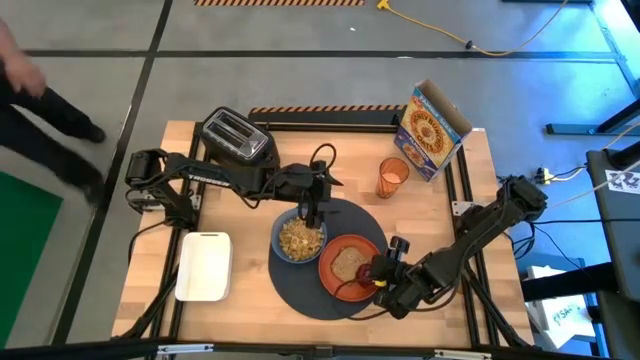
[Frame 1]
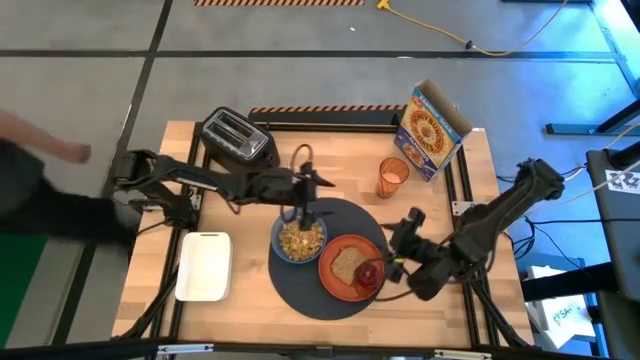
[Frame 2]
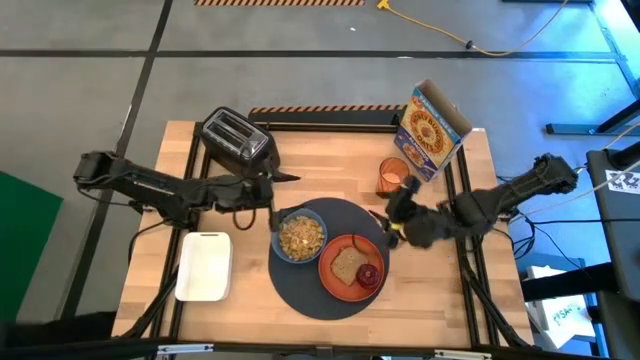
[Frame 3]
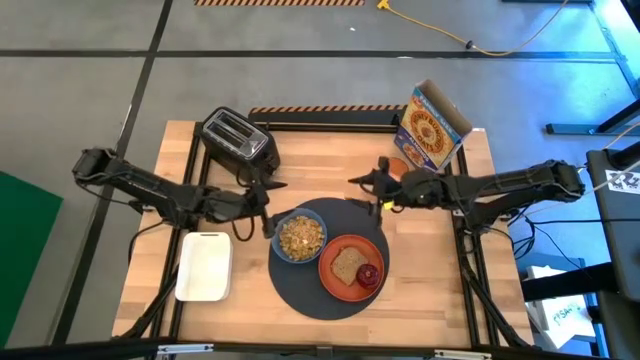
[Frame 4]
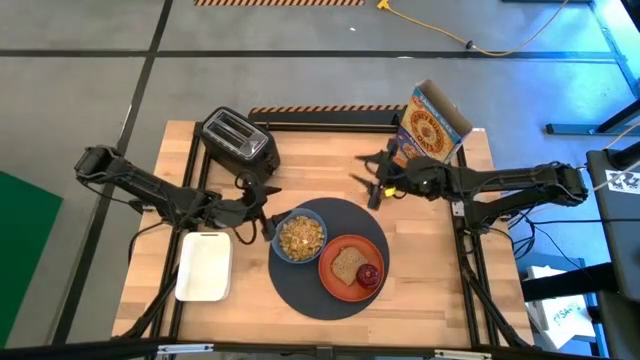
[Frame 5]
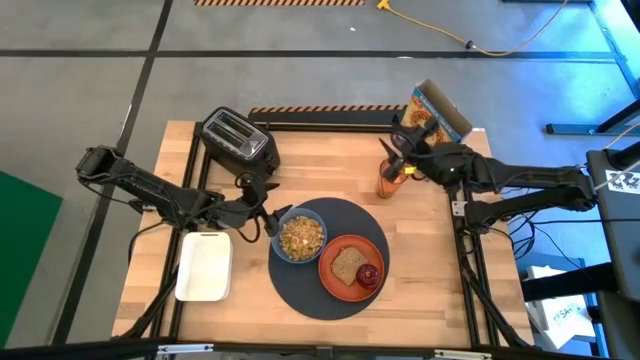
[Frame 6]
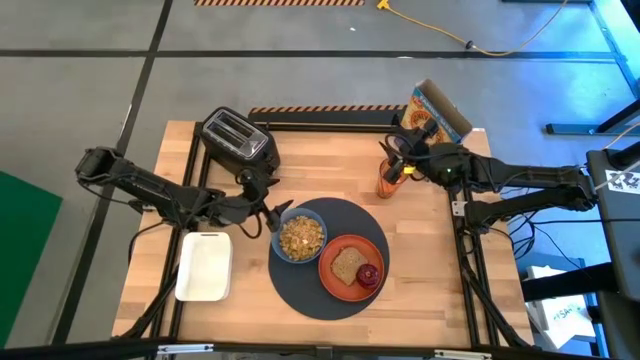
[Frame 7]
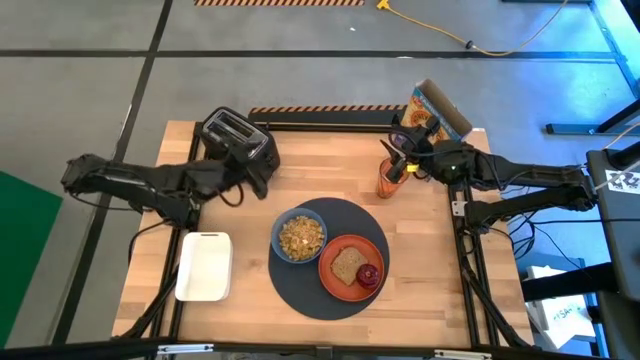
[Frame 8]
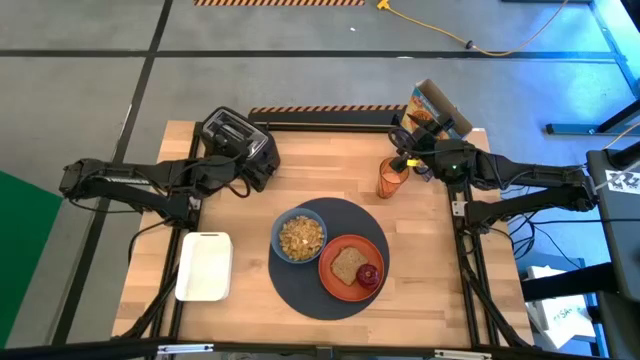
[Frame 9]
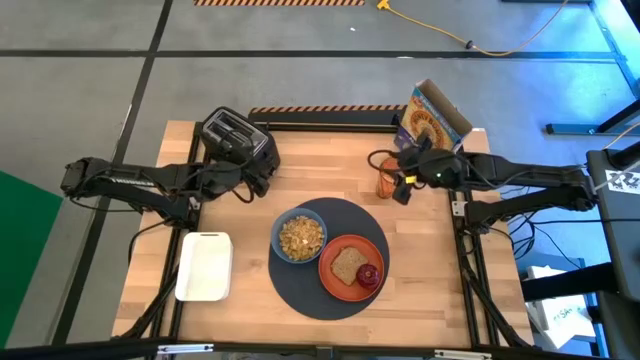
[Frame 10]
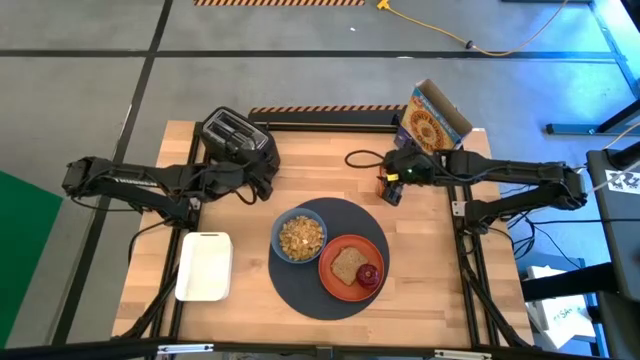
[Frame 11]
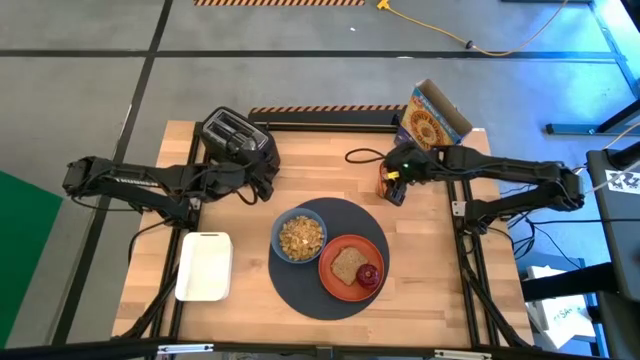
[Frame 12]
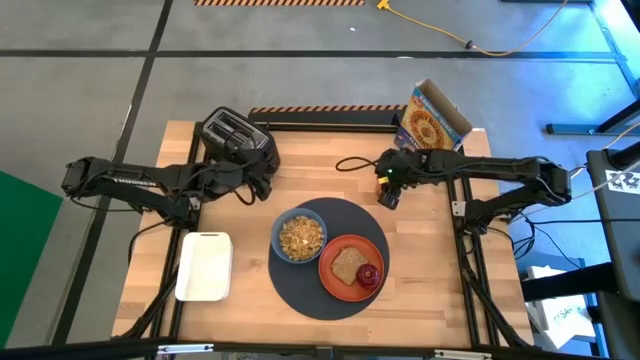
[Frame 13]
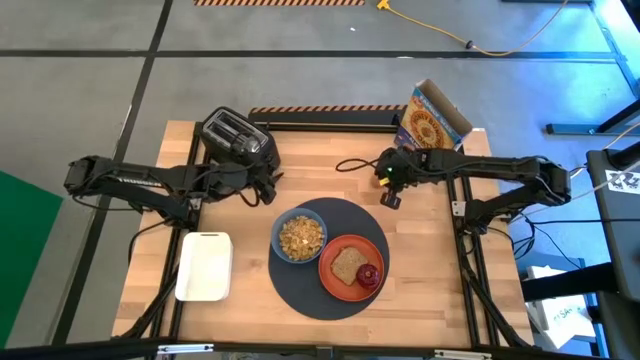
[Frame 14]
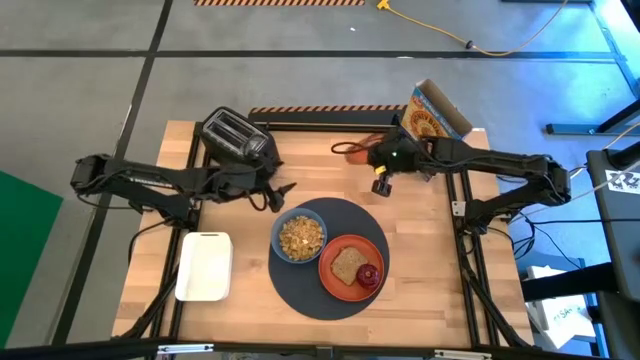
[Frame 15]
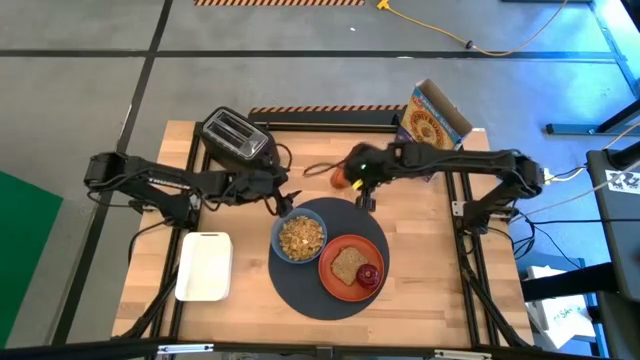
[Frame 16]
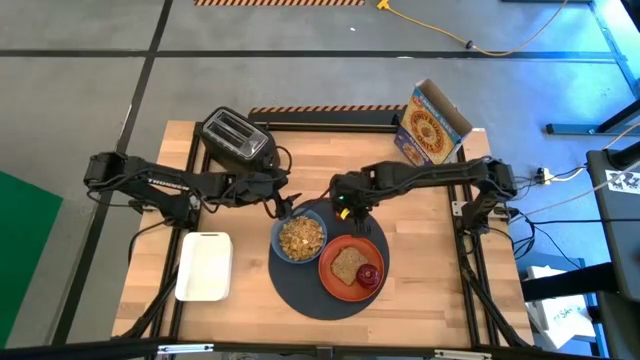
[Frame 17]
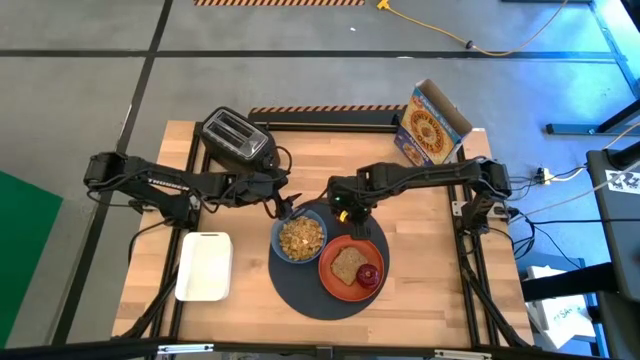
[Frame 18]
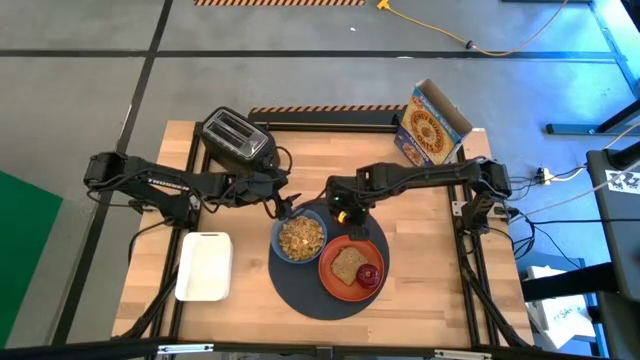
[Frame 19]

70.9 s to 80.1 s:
Task: Arrange a breakfast setting
Put the orange cup on the black table mat

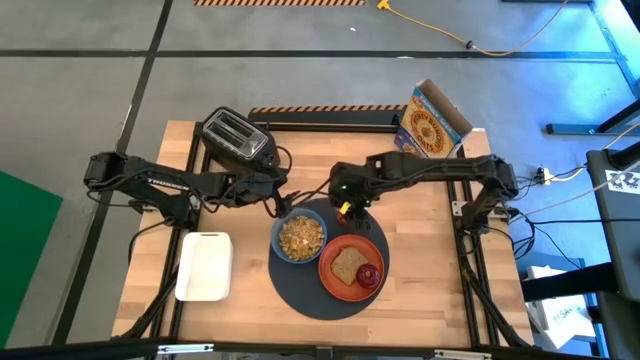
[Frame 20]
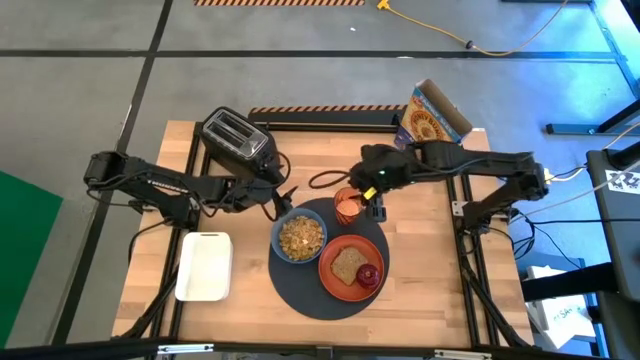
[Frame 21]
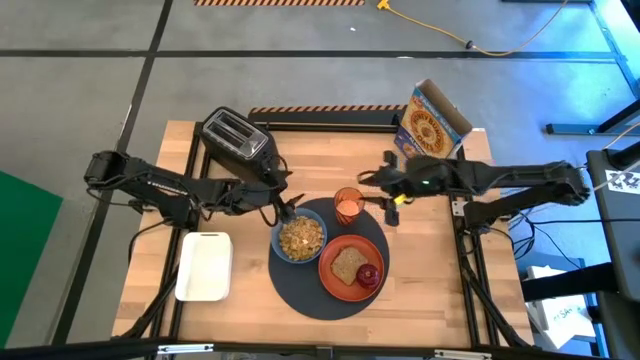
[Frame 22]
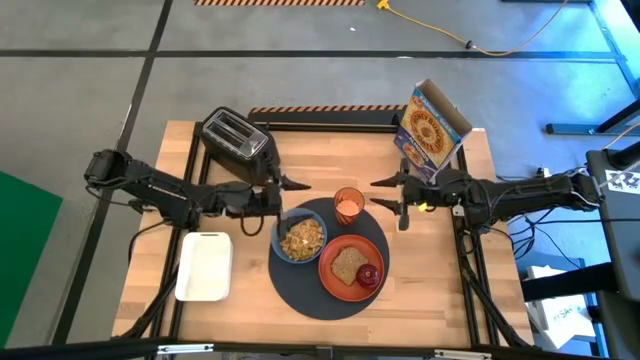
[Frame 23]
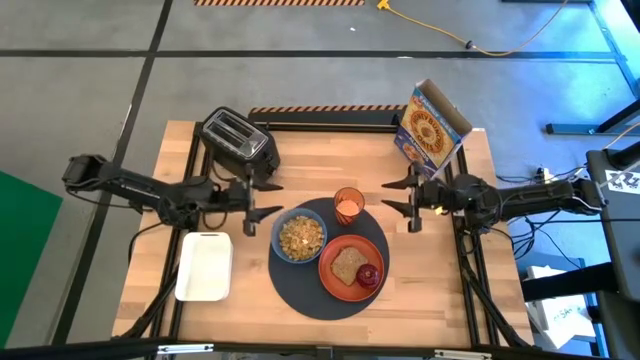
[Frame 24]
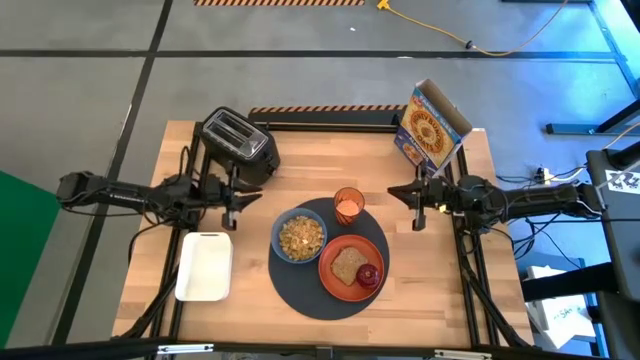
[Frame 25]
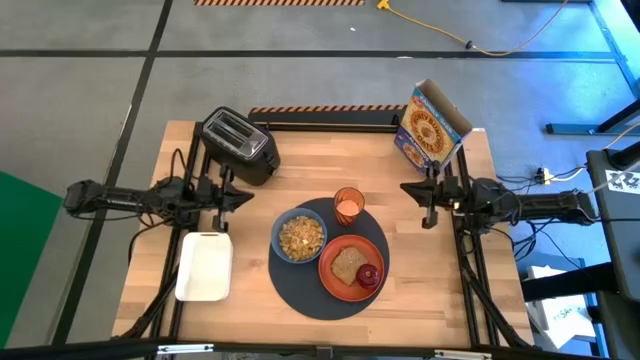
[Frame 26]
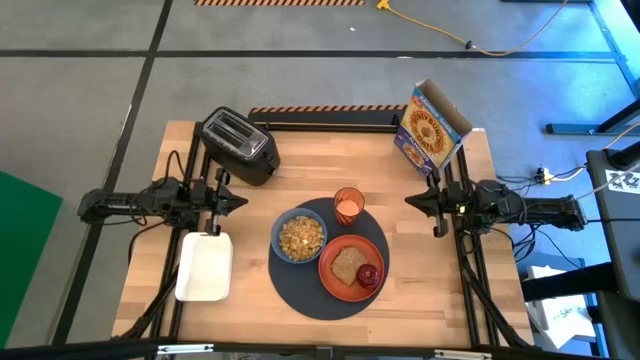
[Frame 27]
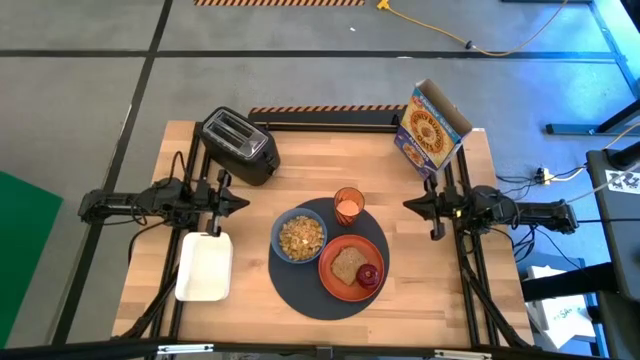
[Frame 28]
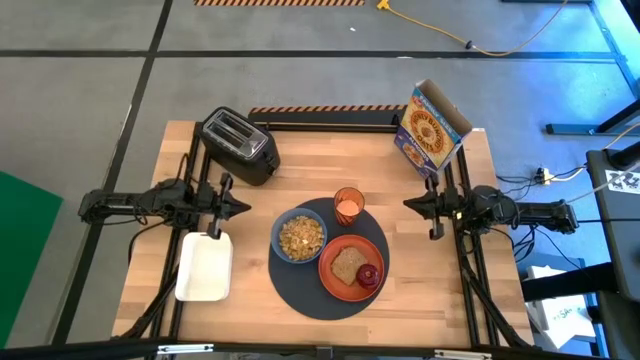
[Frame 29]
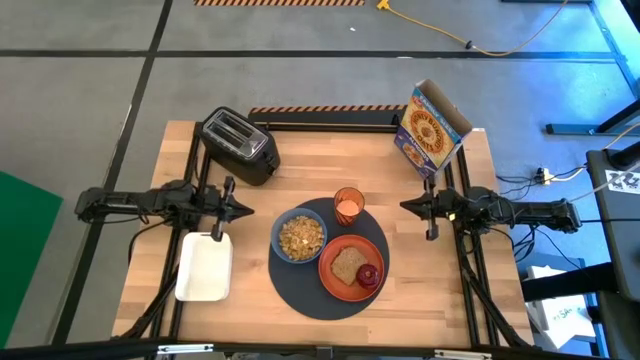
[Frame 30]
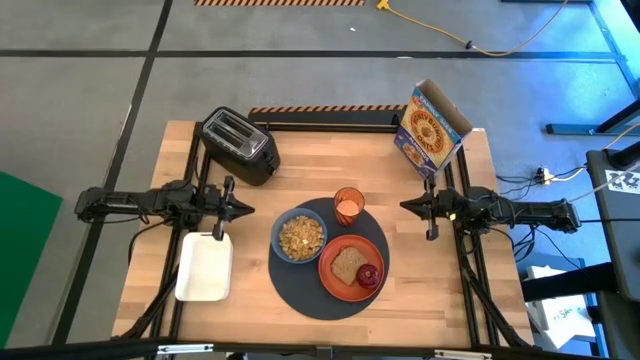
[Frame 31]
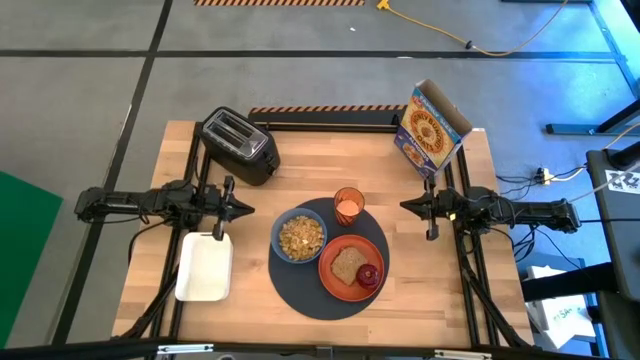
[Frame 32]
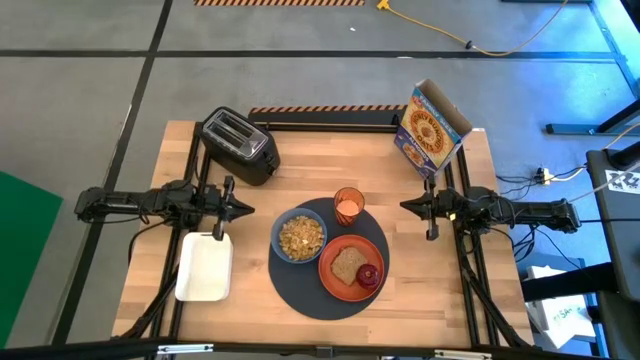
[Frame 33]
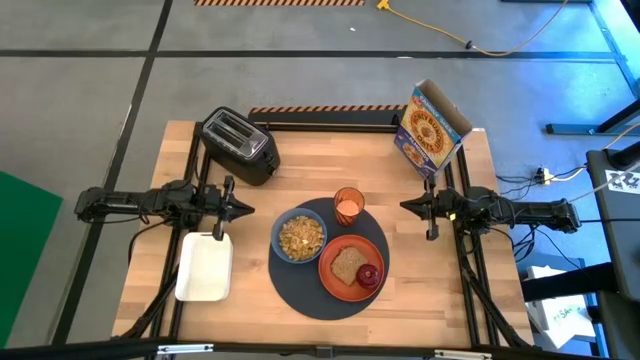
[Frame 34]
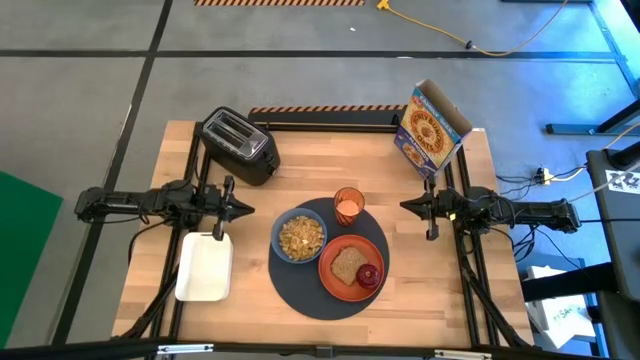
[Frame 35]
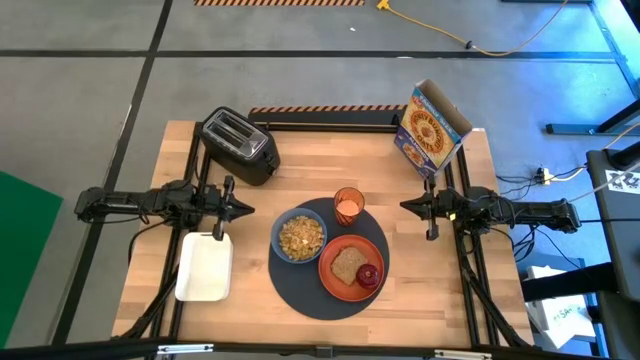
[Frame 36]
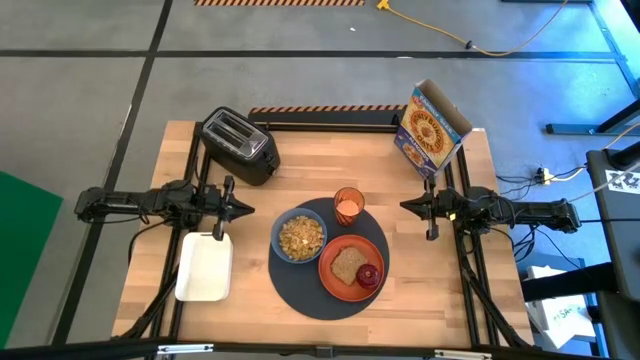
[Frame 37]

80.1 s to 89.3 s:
Return to Home Position

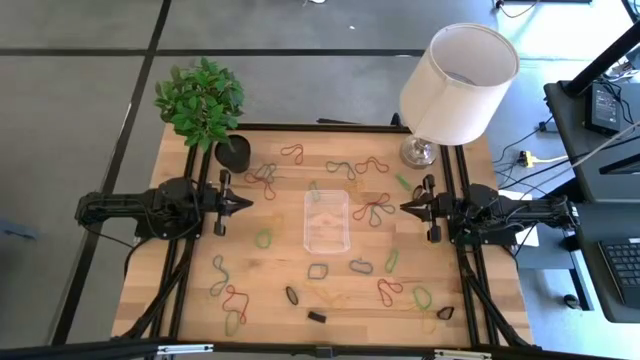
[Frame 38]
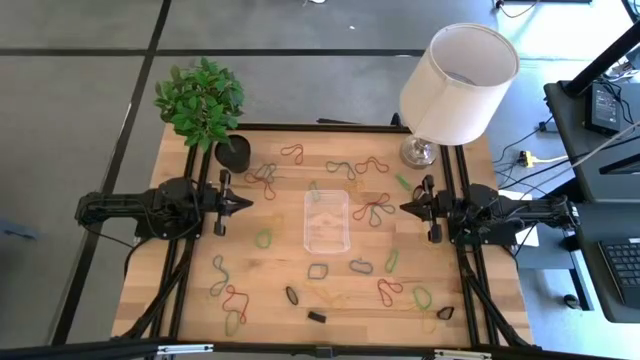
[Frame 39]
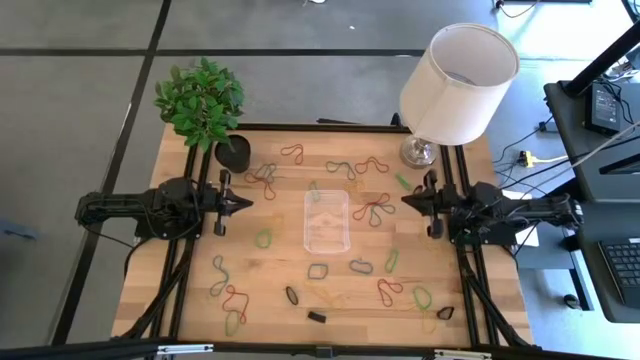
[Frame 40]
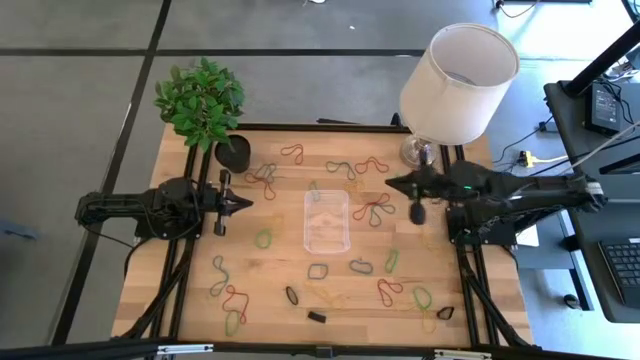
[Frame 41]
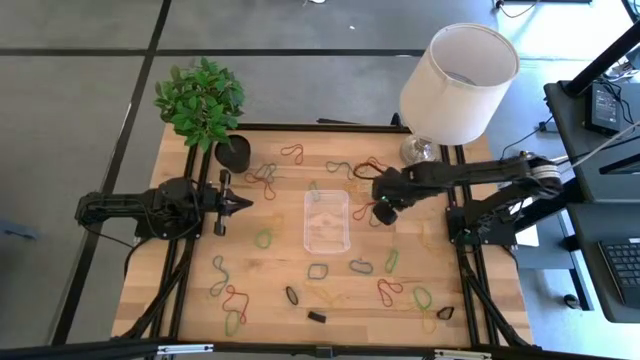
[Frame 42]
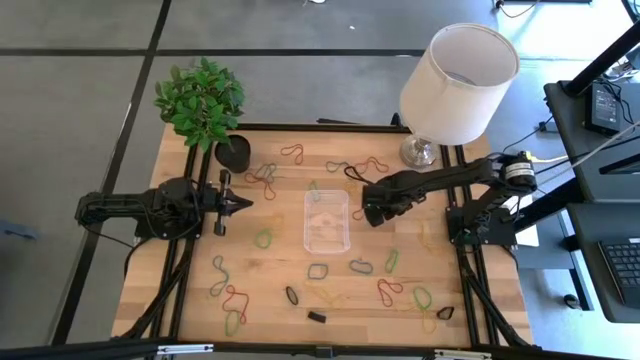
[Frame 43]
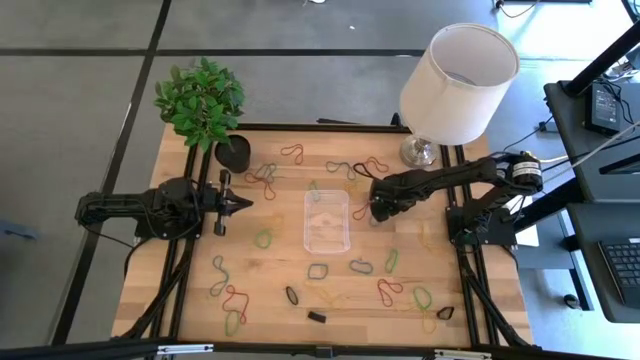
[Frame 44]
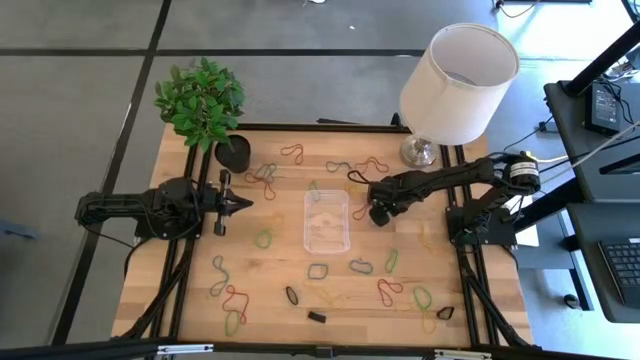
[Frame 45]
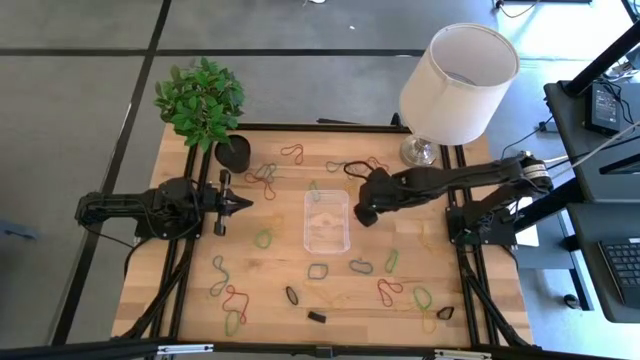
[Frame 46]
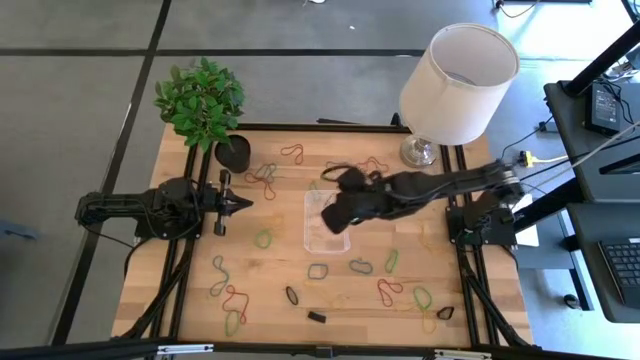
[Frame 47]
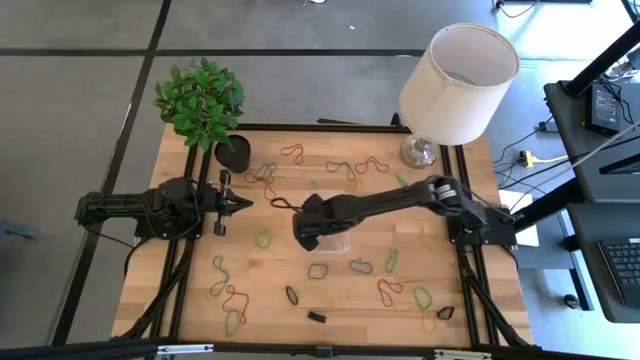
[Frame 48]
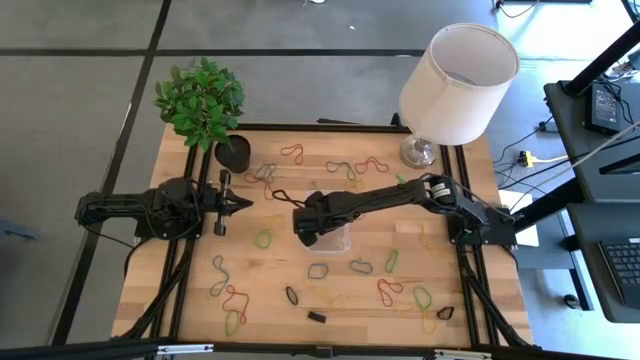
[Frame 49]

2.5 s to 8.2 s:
Task: Pick and place rubber bands into bin
Put the blue rubber band into the transparent container
